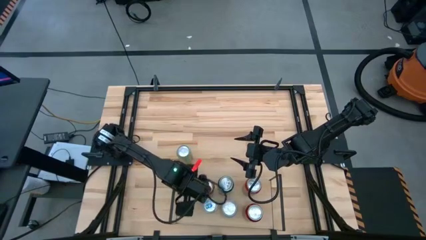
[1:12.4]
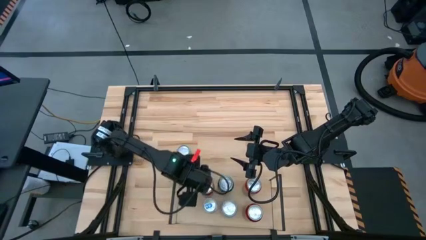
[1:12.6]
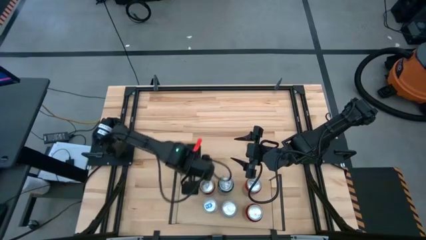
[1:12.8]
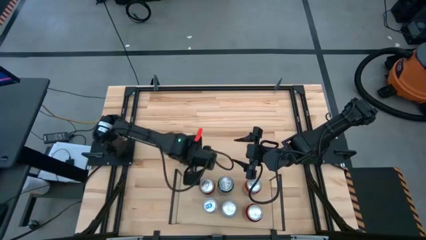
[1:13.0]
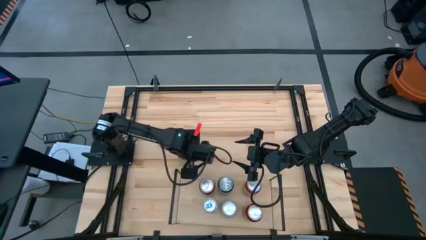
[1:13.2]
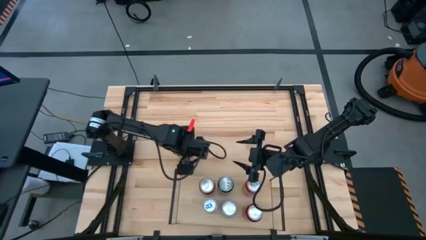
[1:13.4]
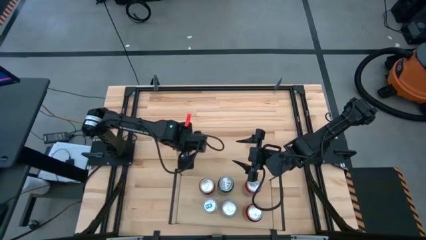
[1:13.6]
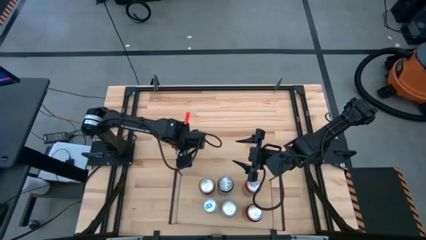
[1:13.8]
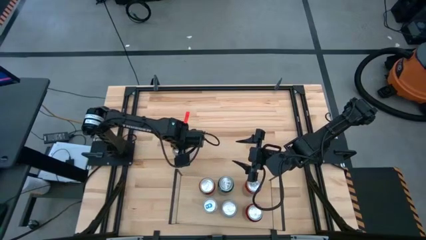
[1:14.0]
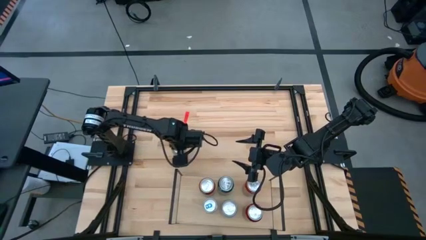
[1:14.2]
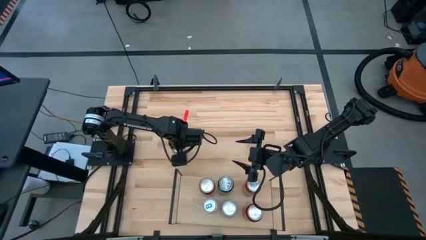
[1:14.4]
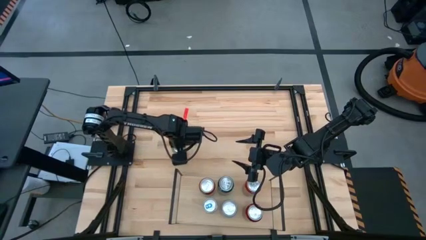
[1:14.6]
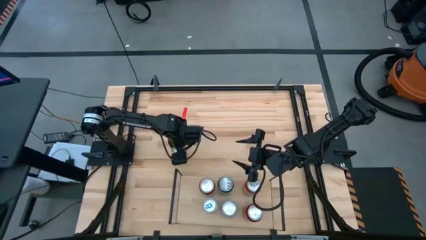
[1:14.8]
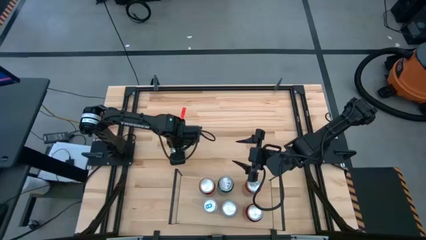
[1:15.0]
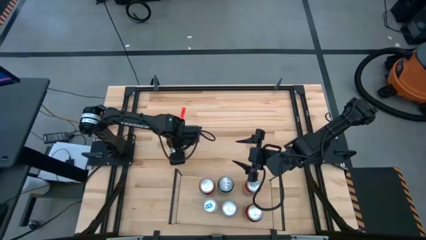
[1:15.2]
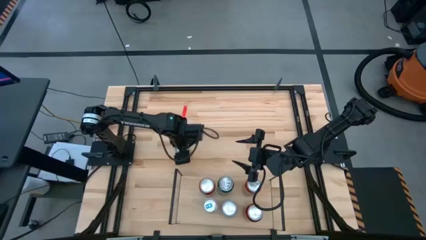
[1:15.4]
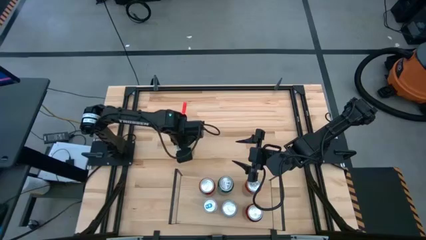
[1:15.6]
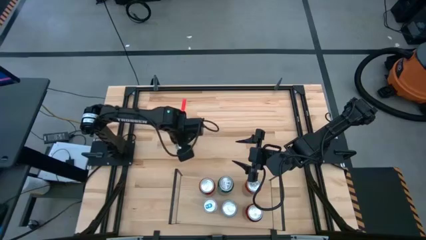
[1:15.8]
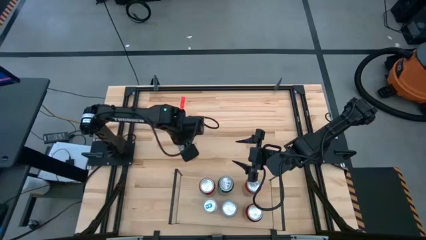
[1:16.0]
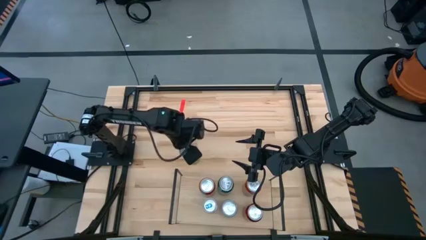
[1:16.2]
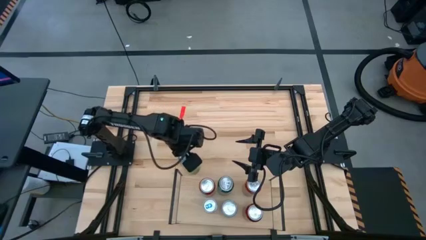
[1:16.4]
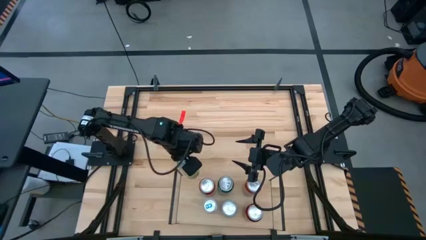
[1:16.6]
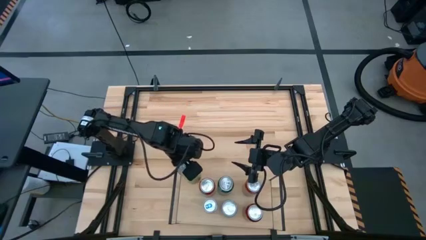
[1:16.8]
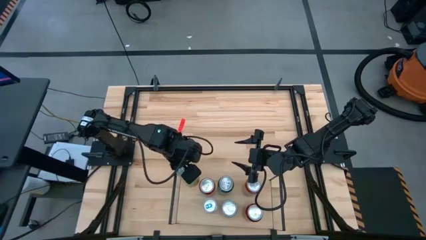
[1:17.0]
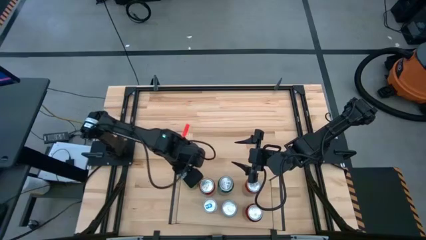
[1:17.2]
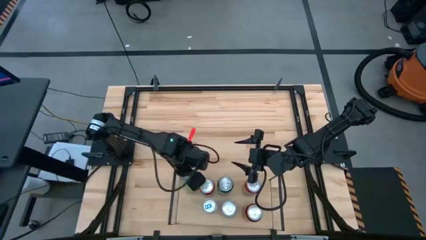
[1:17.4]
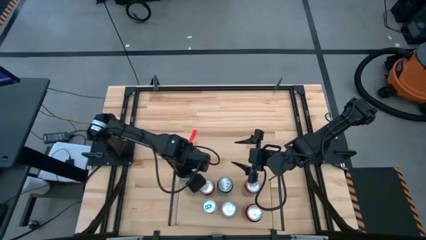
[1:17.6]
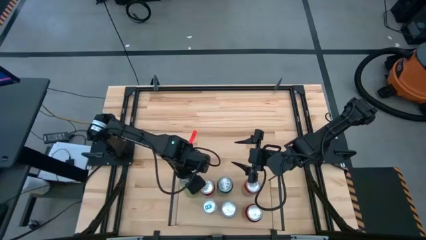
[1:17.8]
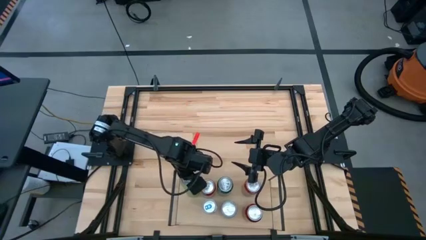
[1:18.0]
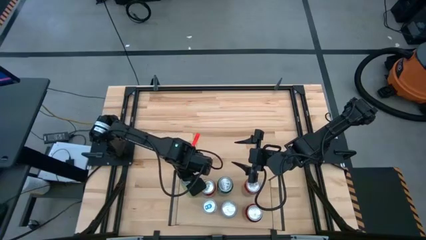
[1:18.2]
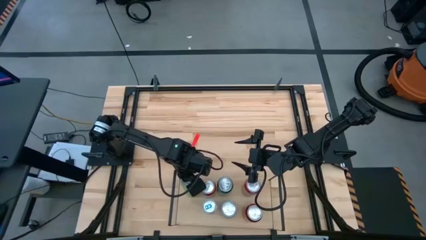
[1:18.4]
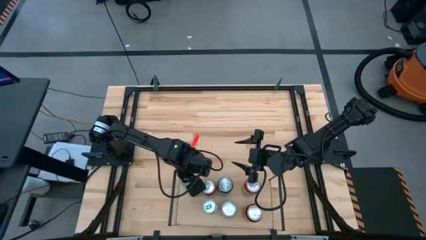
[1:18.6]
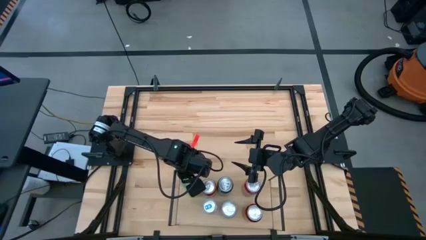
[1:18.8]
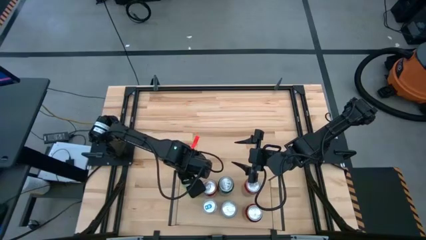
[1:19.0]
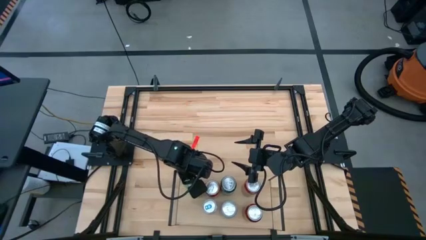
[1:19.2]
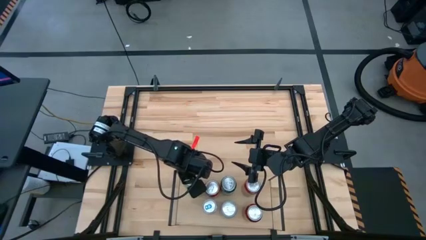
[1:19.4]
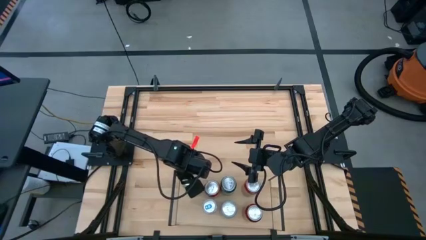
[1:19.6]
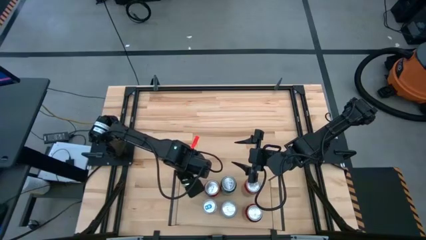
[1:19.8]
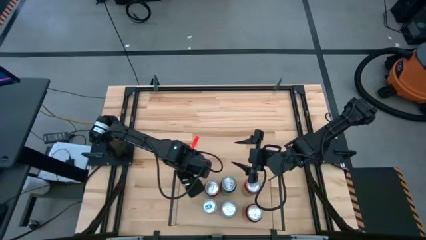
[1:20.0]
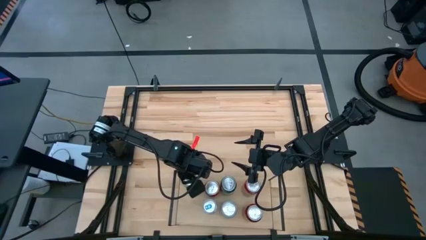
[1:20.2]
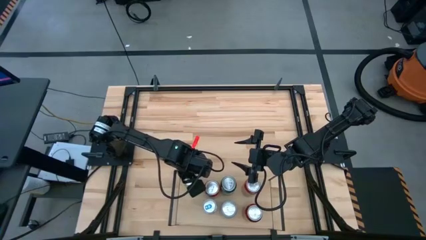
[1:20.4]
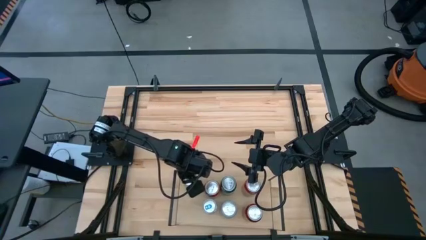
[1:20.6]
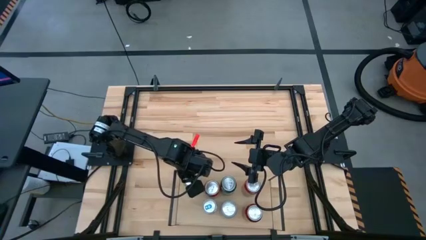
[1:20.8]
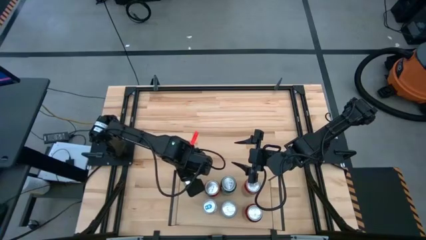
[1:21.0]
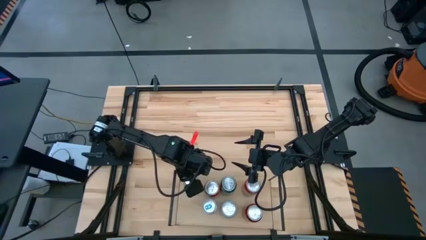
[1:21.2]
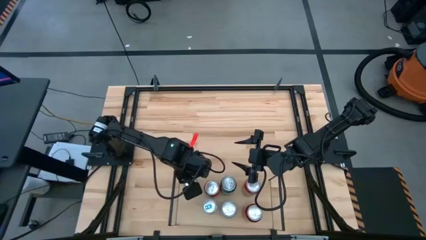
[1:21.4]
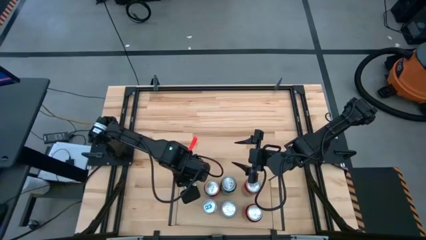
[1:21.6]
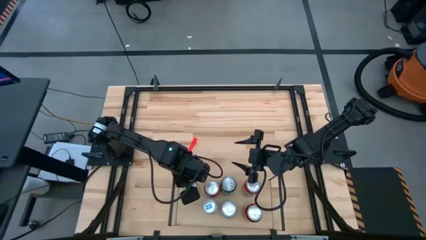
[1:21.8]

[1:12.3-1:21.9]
Task: Place canned beverage on shelf
Put the light green can on the shelf

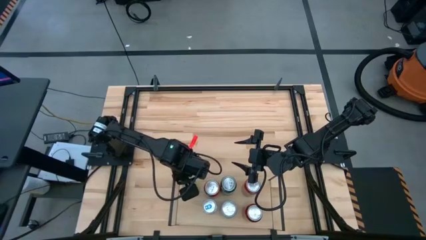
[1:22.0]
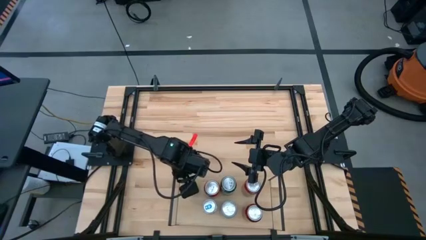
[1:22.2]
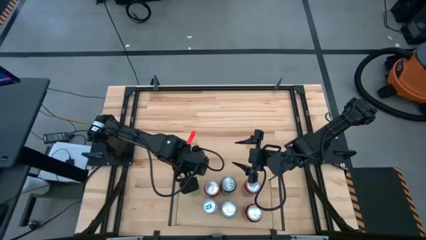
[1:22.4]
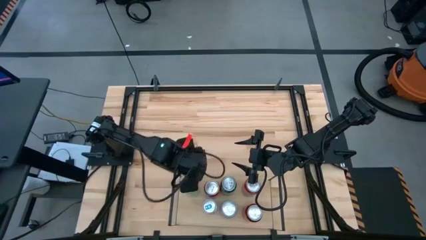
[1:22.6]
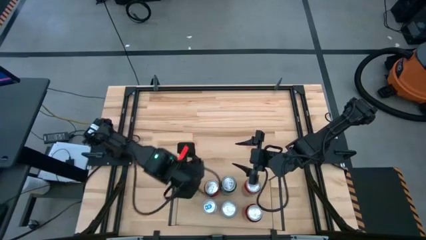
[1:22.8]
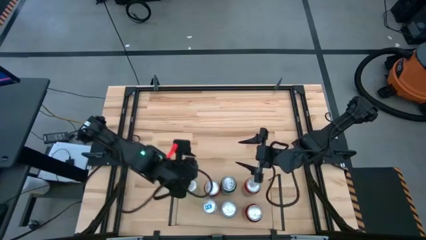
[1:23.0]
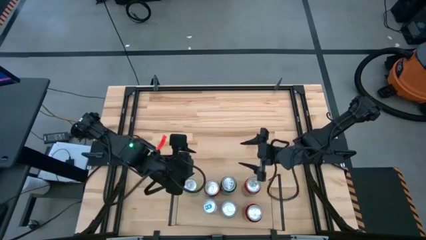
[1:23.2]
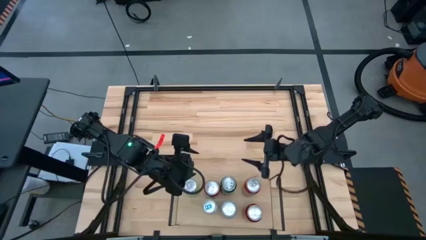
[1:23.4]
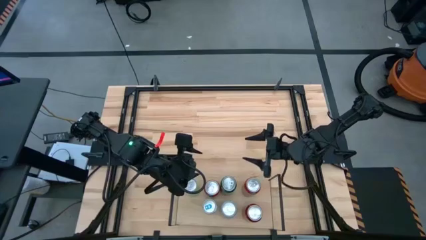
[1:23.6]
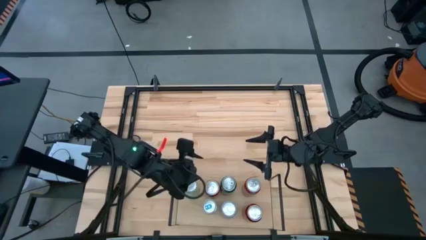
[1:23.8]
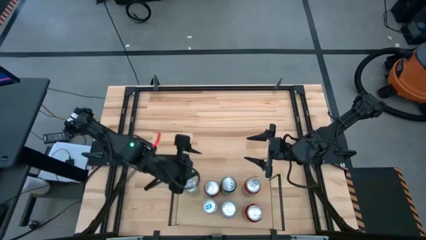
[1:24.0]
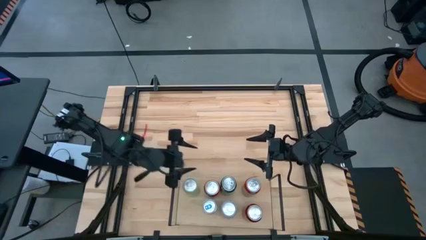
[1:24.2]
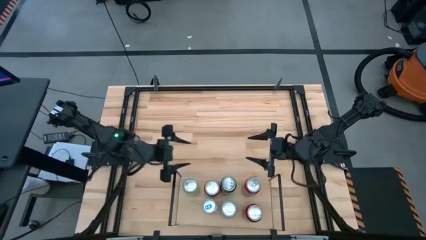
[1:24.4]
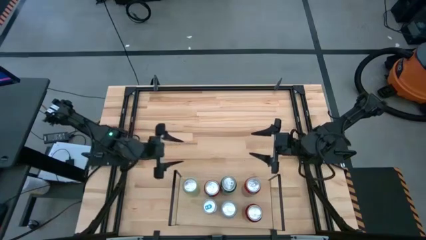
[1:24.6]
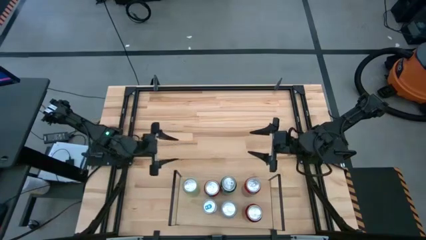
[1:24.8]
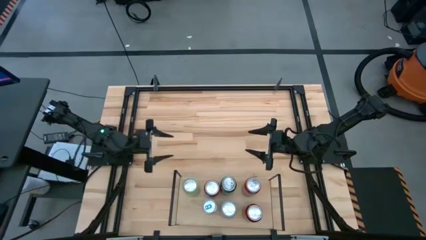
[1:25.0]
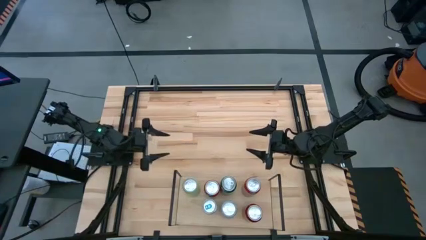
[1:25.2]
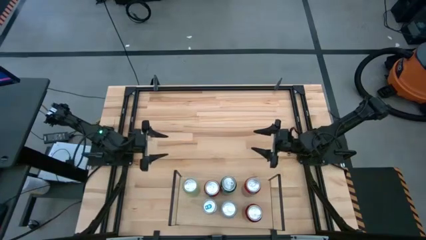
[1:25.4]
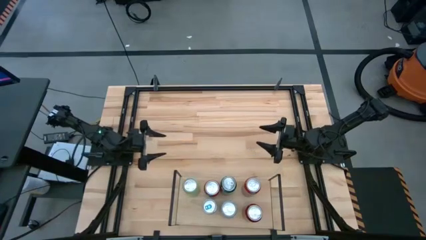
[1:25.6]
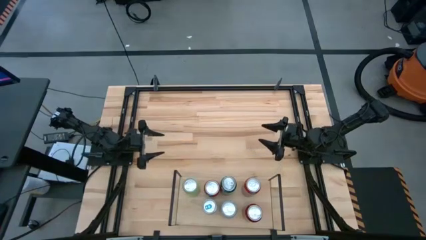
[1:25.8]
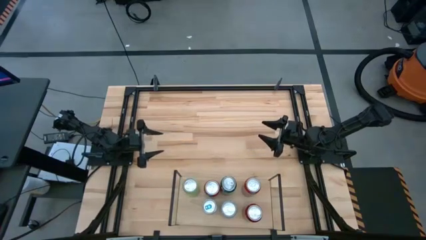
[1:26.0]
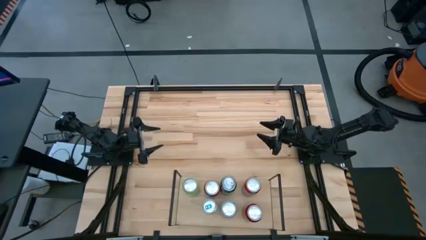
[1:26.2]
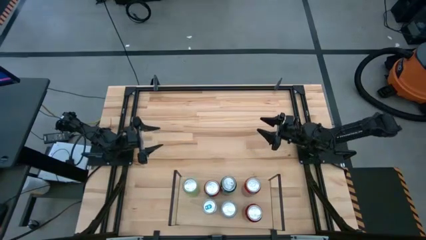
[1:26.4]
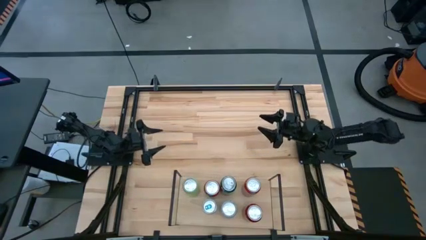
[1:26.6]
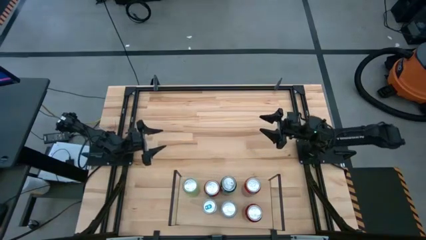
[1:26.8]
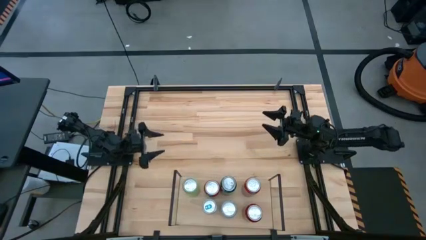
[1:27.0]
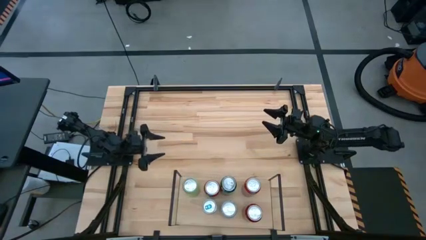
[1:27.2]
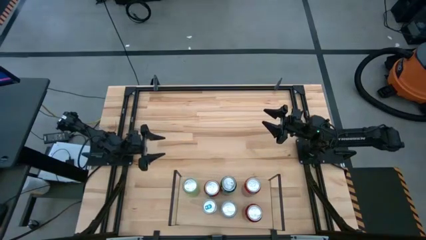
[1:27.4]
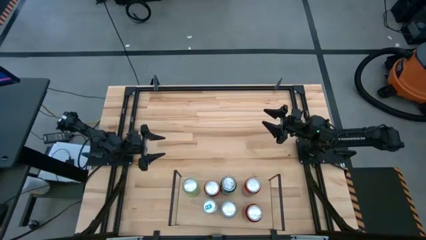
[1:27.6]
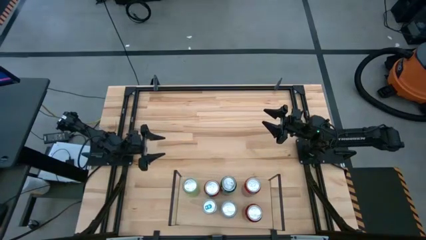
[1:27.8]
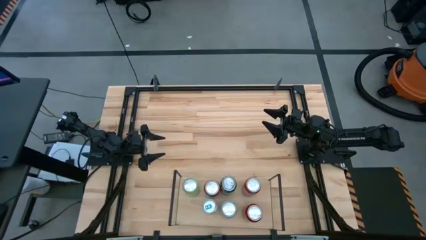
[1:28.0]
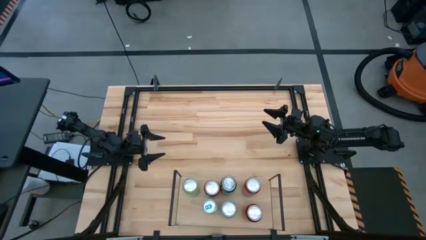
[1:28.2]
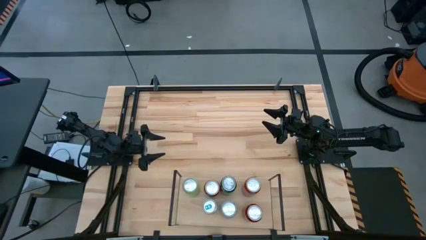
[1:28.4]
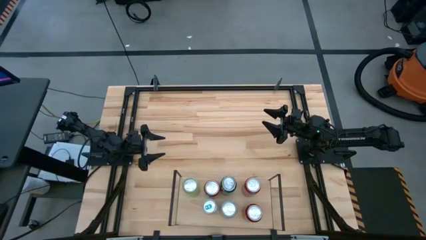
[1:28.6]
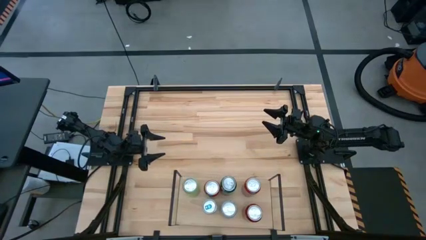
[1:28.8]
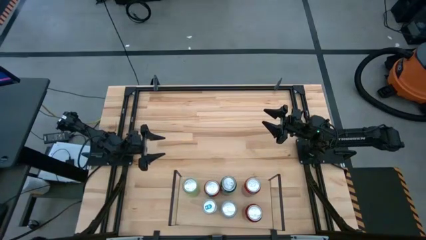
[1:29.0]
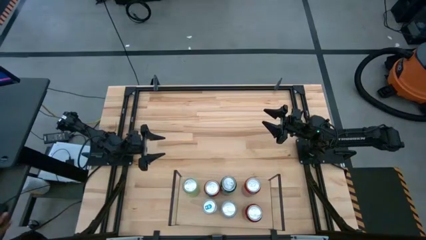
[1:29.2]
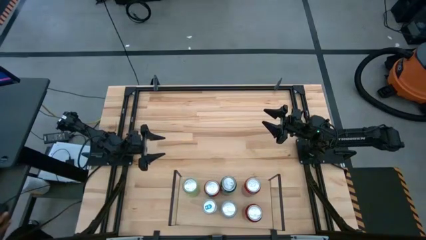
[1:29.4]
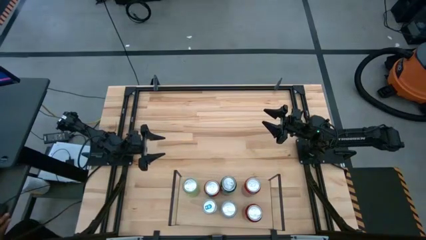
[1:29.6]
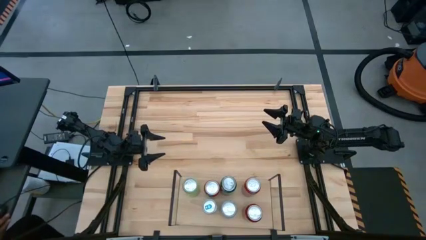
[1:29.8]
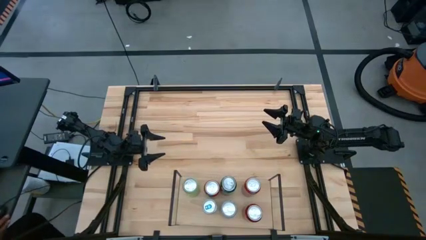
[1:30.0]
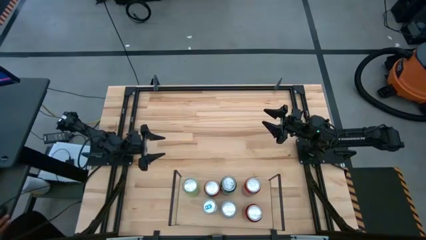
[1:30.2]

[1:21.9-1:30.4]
Return to Home Position
